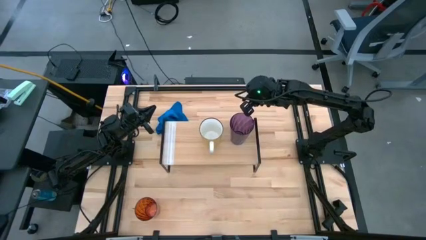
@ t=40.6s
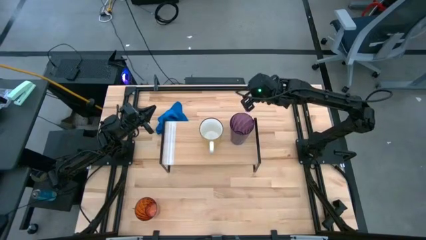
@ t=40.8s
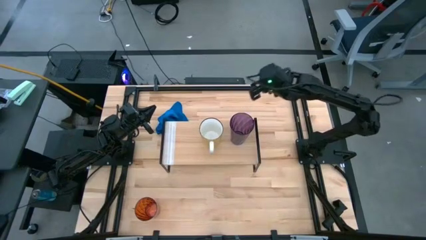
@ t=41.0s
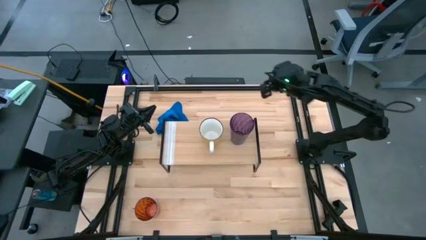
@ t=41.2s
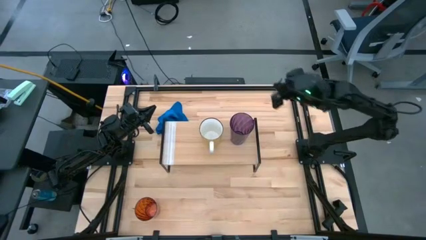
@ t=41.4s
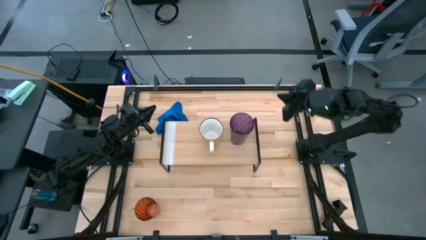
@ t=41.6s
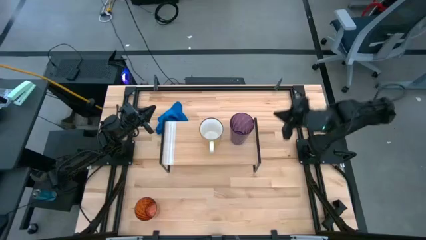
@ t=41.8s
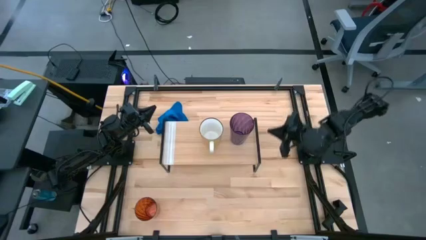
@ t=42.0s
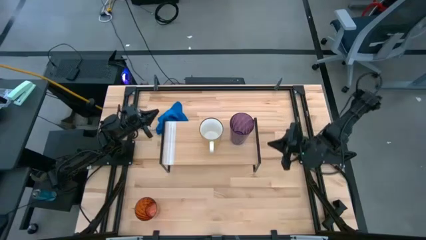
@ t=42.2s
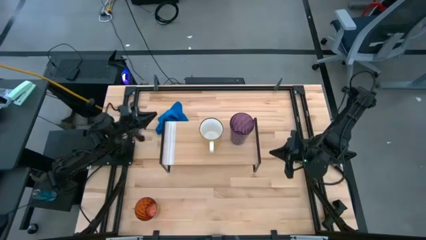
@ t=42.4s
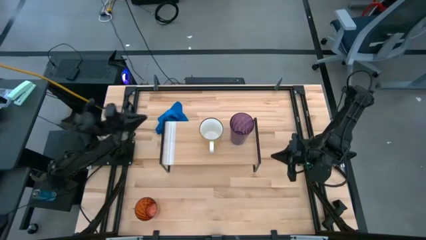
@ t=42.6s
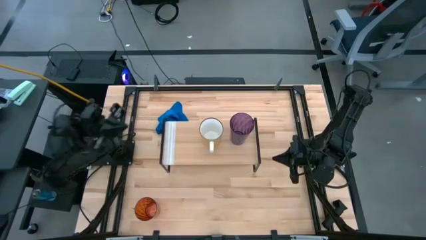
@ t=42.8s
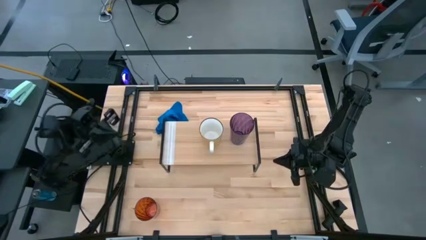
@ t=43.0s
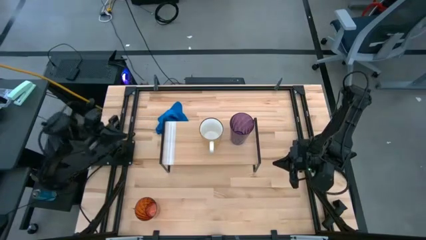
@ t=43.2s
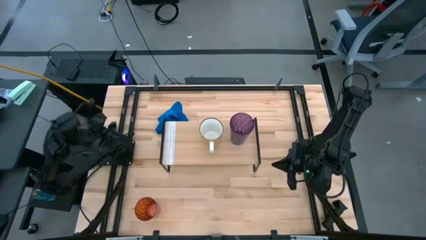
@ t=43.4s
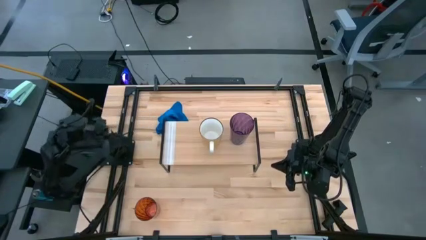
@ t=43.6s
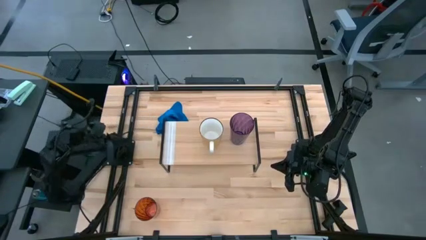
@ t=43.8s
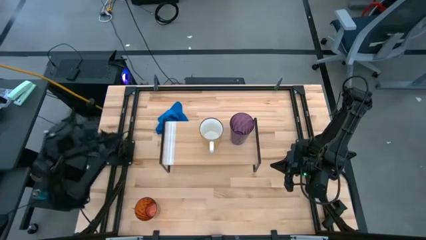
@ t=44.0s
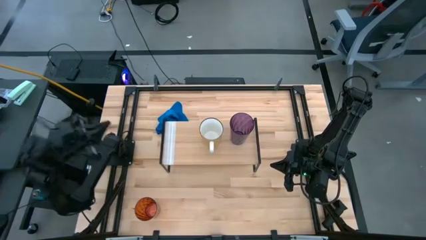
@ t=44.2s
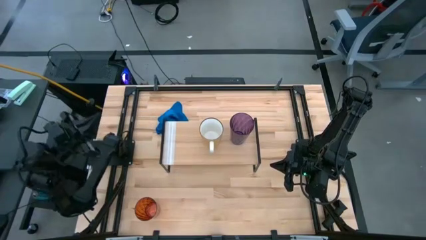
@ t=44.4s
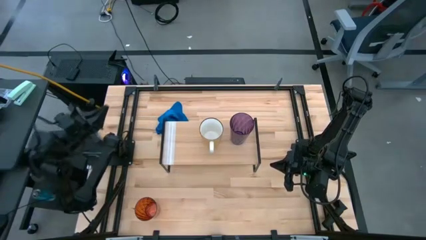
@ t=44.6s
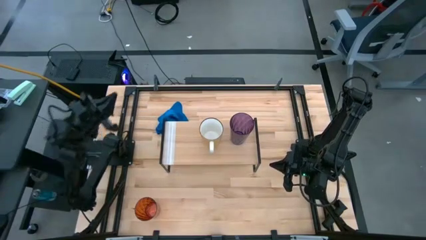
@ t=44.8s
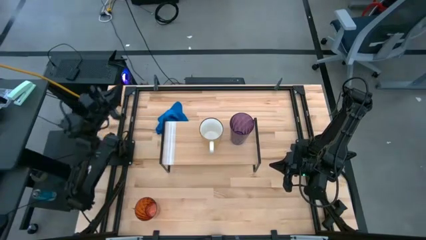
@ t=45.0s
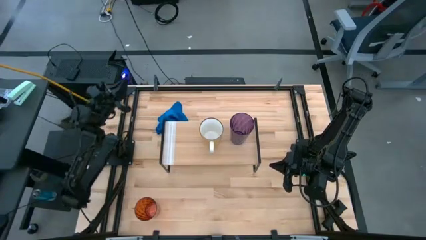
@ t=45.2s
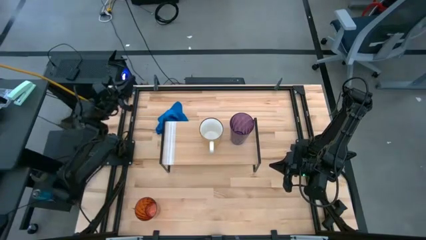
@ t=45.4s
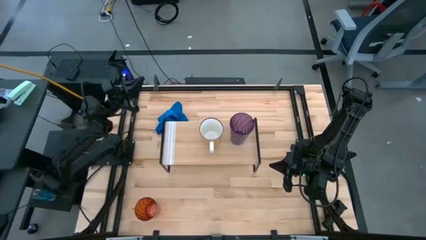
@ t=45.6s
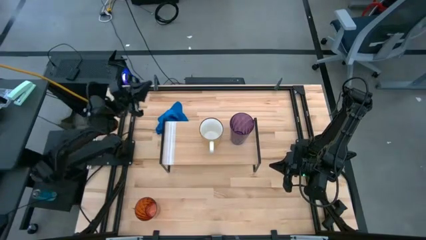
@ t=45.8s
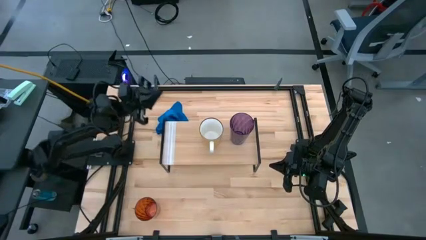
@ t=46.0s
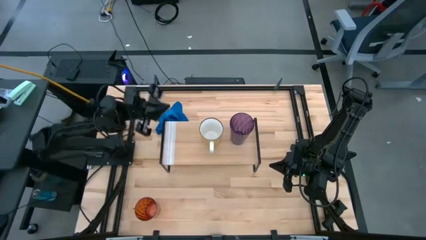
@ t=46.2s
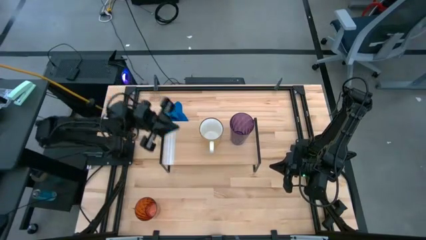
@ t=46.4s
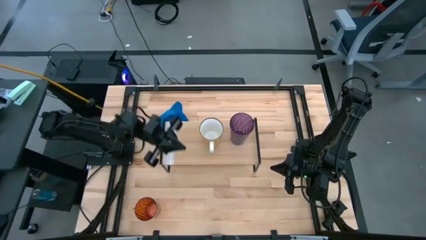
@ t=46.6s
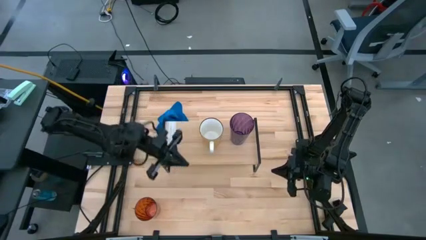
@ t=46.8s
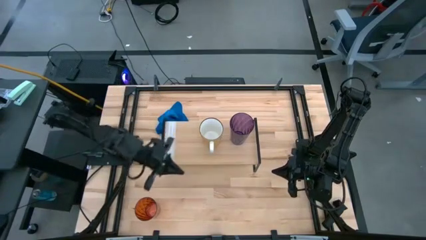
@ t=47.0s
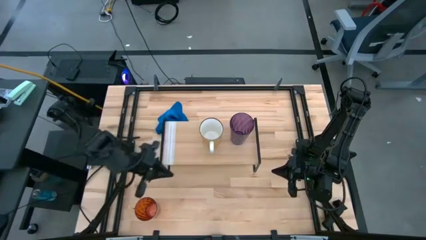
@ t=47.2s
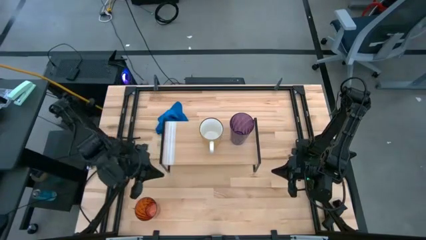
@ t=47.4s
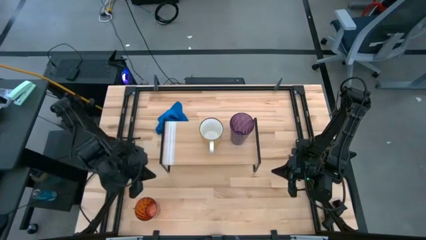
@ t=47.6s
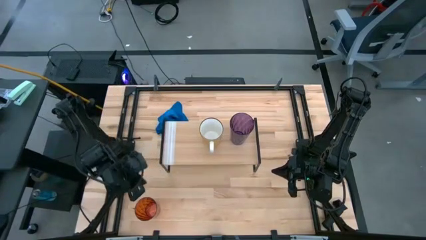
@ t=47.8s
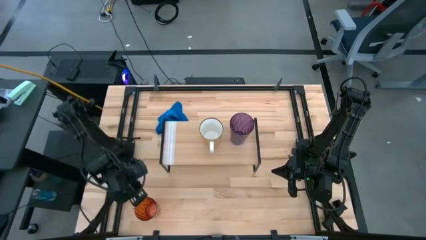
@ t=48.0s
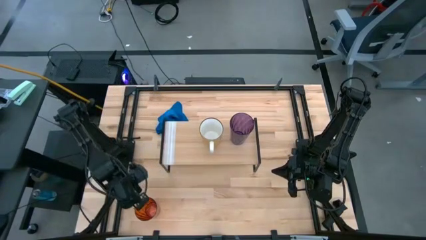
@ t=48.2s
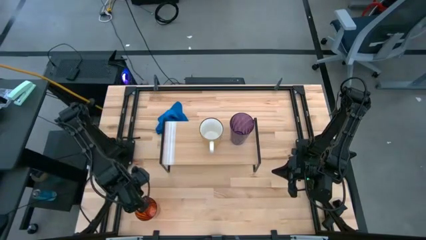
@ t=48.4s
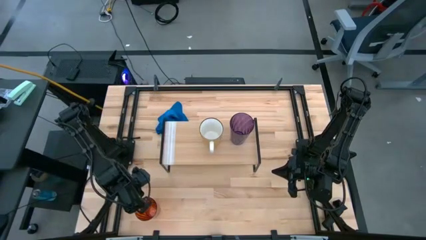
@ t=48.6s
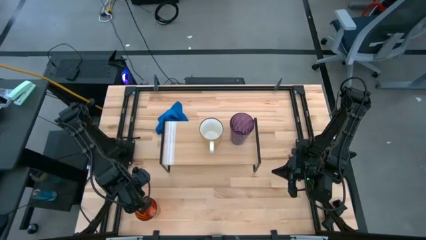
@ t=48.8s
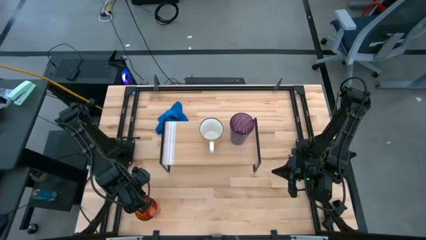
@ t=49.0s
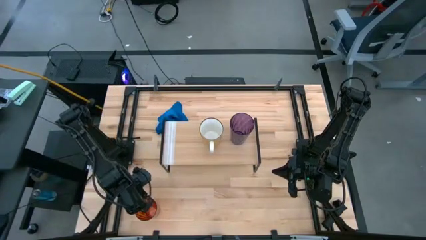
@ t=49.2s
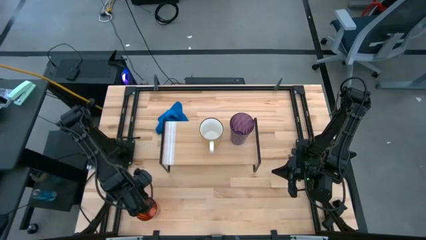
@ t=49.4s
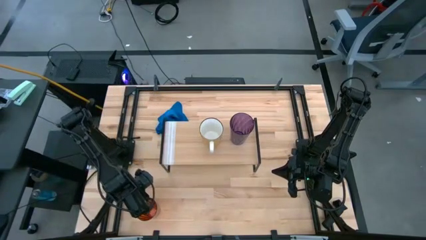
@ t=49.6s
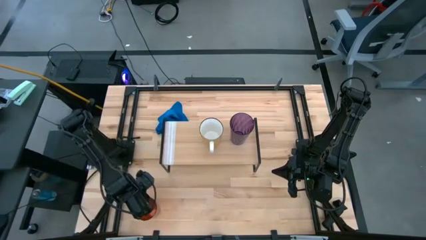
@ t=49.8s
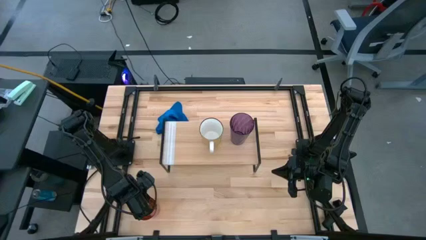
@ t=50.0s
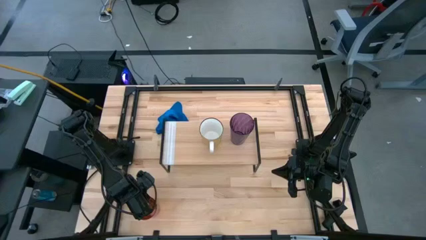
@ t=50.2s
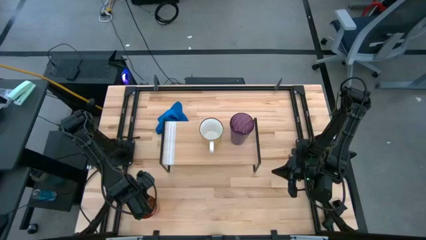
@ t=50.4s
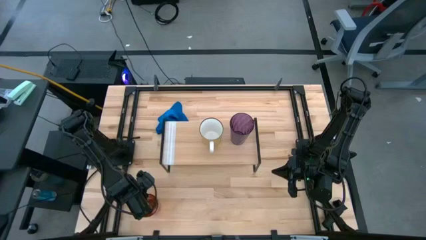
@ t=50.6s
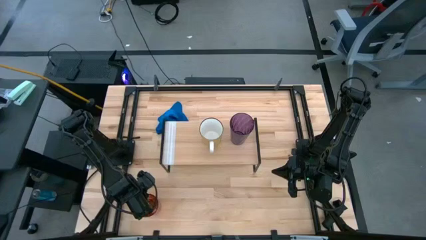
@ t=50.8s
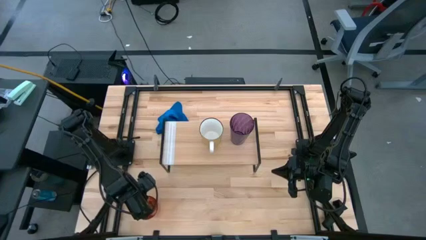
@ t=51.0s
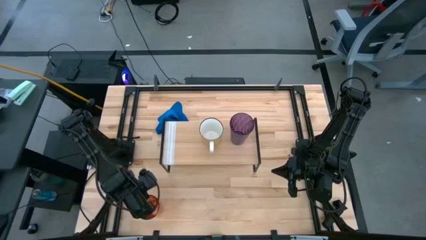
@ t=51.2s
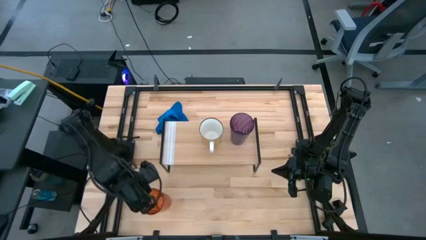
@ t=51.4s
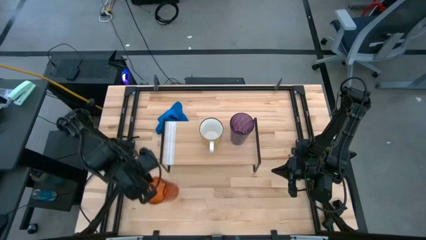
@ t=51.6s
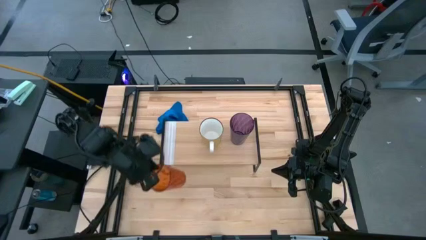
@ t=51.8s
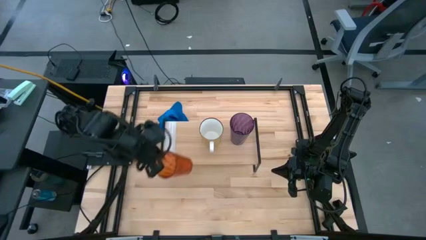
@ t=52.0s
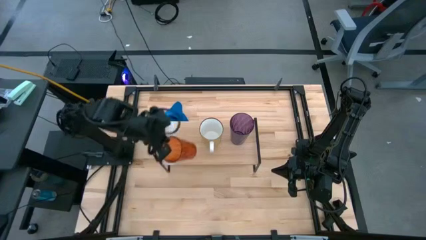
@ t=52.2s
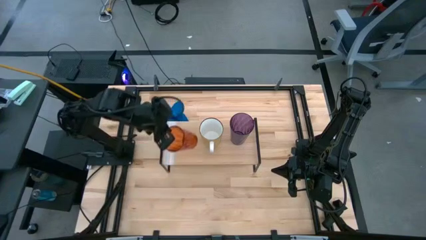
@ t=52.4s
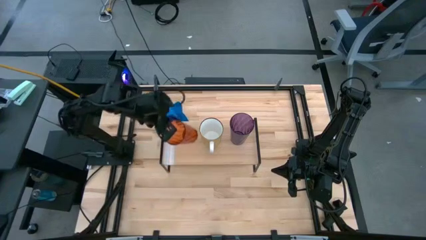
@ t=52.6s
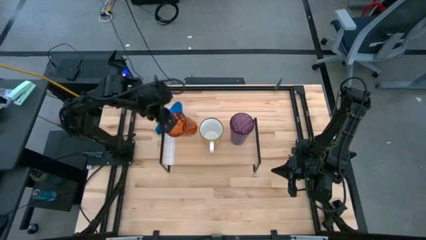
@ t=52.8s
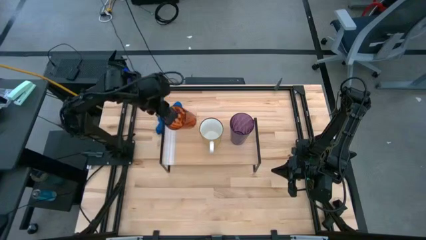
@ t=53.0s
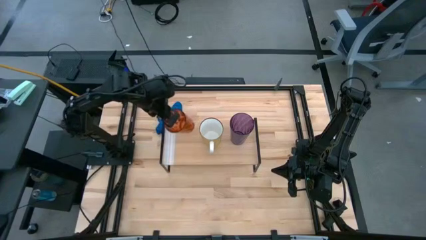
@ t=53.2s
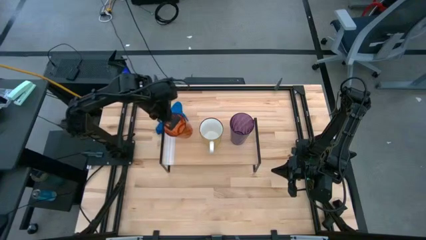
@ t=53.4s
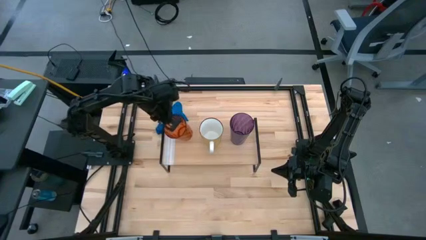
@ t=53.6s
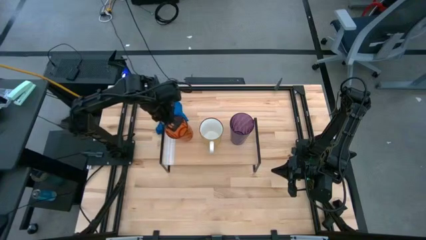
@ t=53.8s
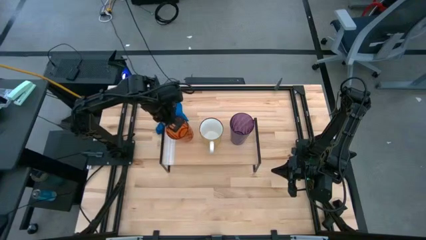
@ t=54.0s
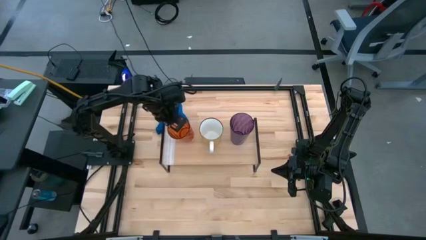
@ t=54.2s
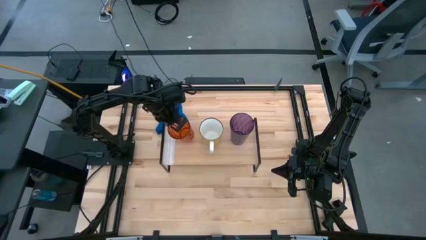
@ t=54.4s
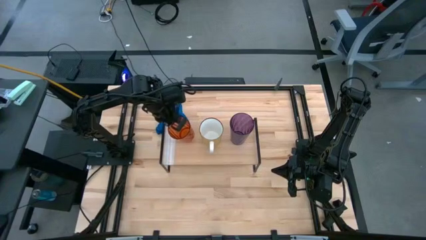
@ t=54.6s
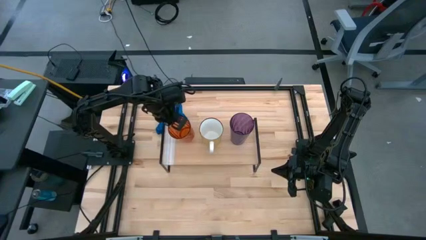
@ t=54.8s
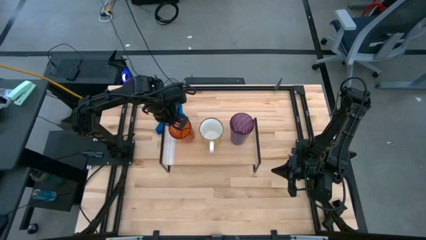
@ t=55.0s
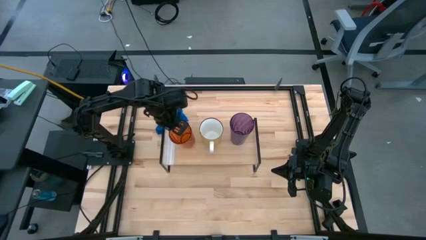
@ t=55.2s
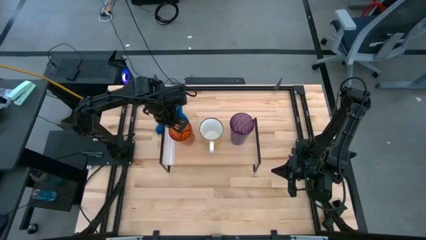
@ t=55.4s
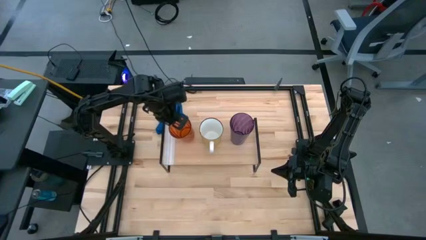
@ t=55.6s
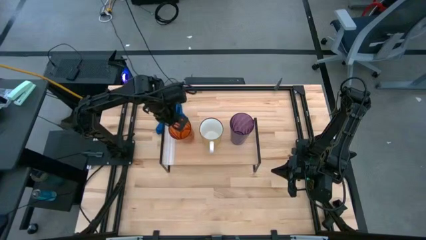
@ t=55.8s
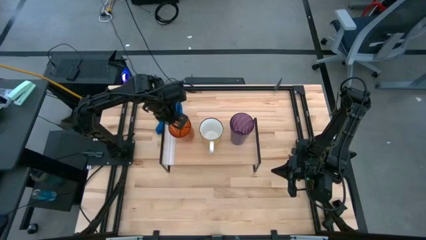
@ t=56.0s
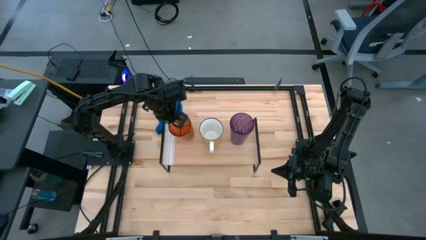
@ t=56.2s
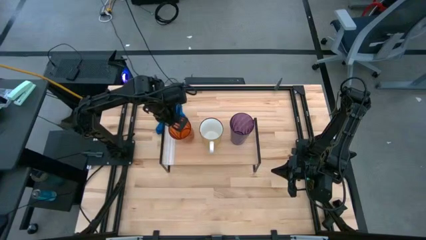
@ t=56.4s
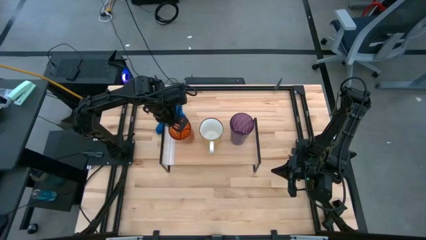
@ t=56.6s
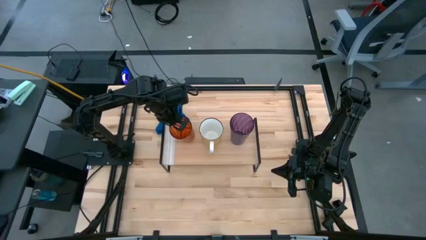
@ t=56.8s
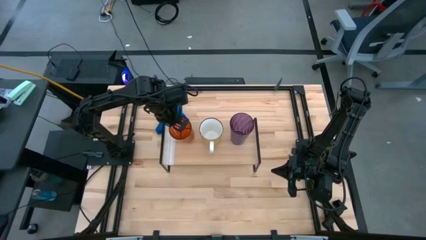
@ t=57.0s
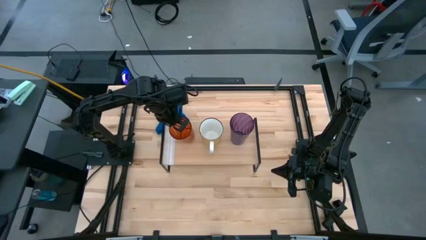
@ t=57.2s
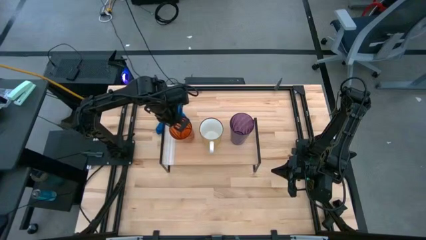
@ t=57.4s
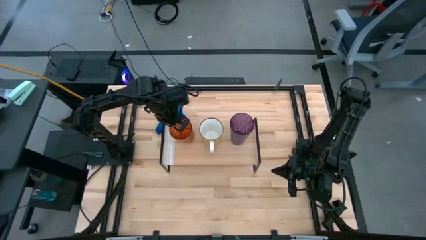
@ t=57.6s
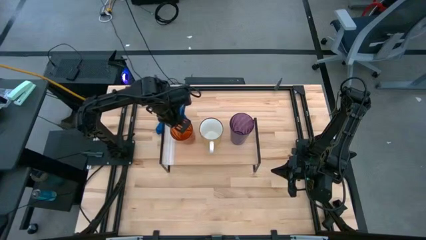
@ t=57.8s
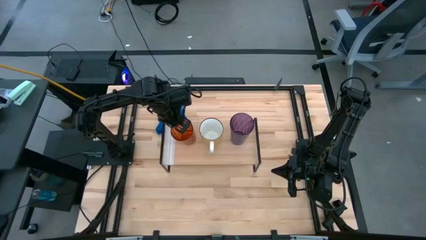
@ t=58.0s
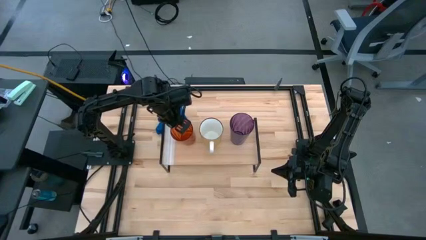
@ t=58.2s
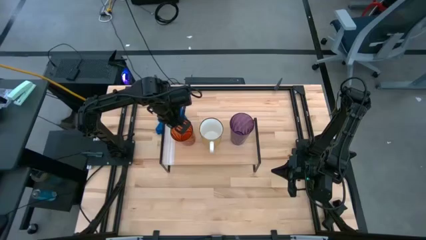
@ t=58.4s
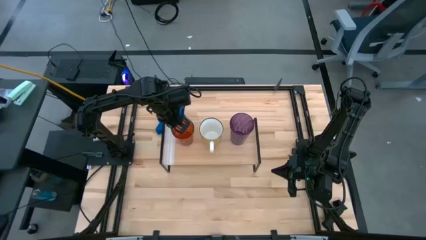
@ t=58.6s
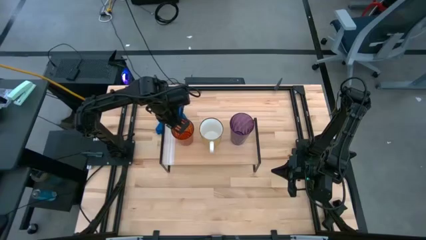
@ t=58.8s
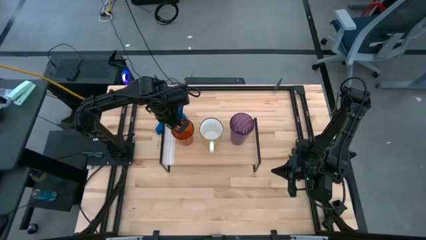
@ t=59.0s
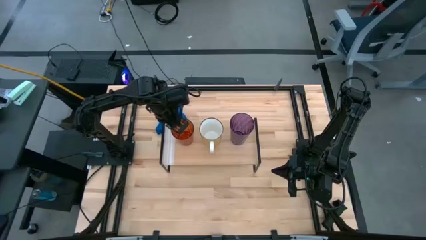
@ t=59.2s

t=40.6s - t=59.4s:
Task: Stack small to large cups/mugs on shelf
Put the orange cup on the shelf
